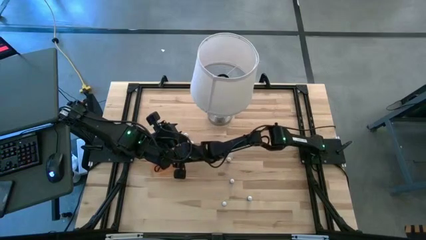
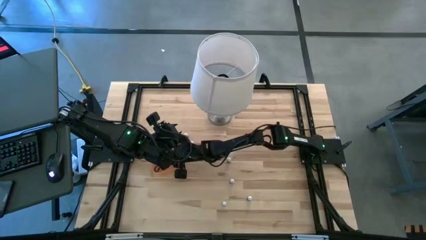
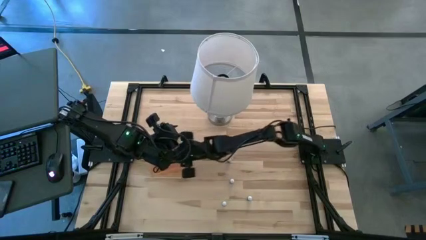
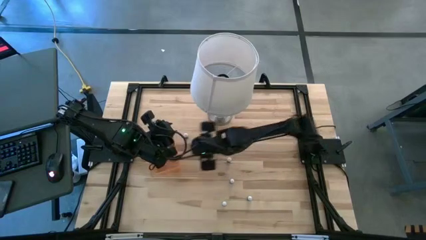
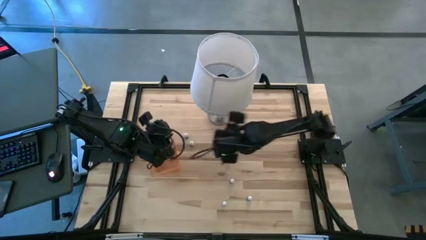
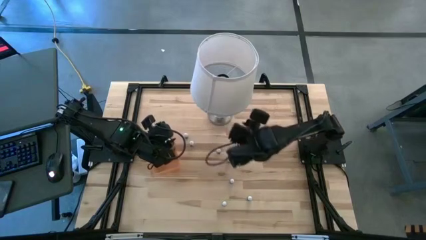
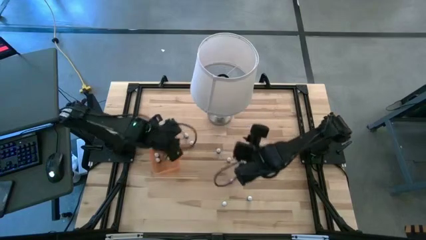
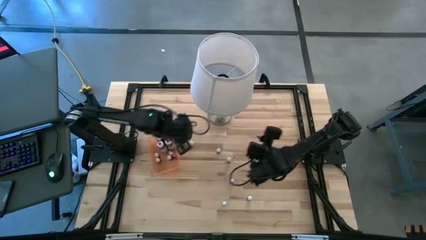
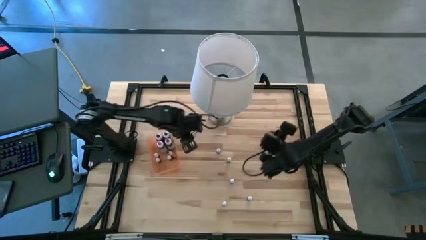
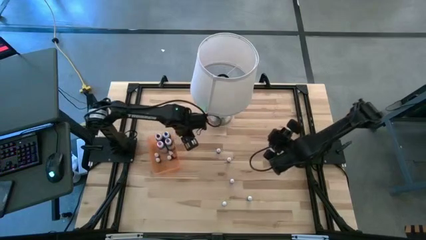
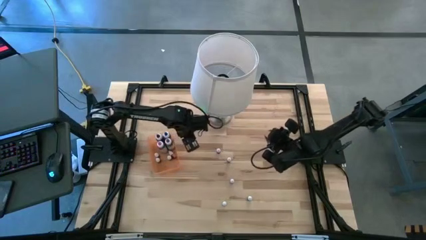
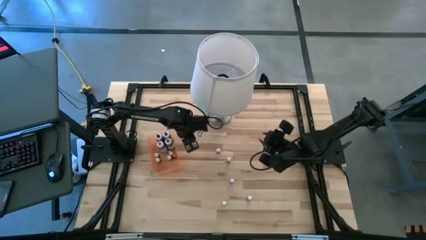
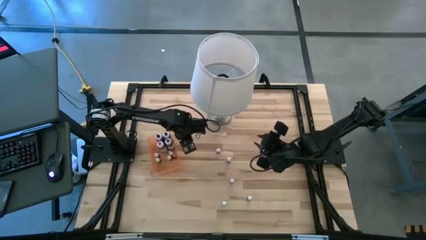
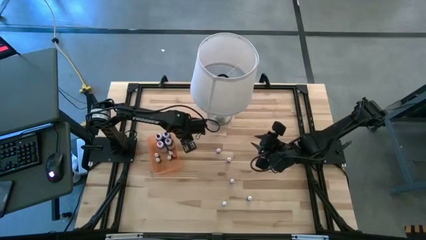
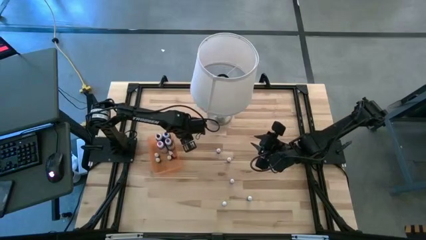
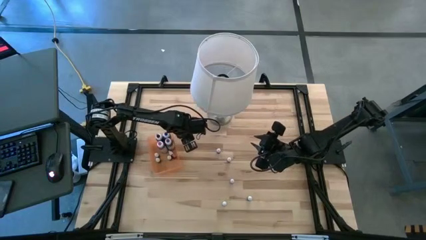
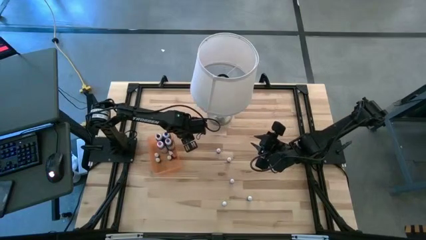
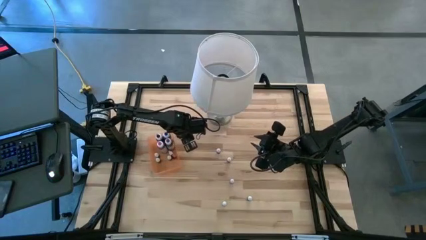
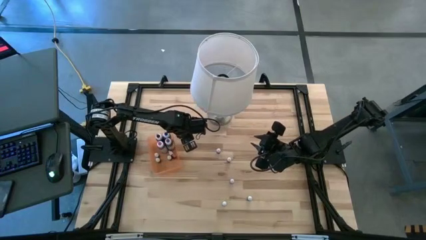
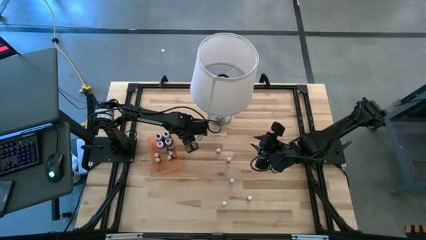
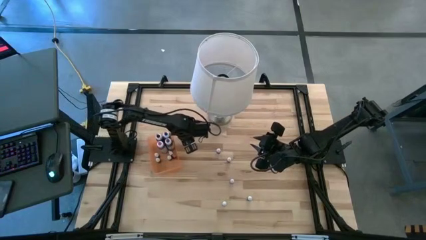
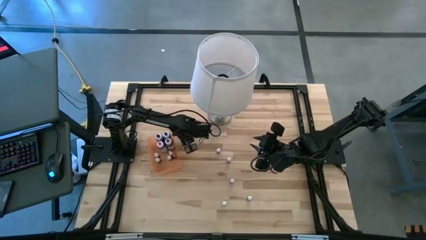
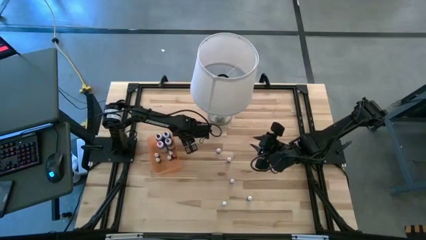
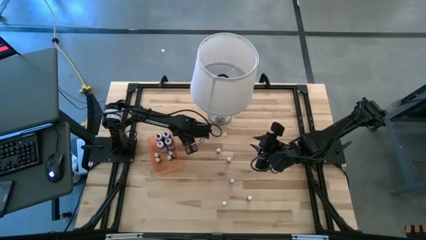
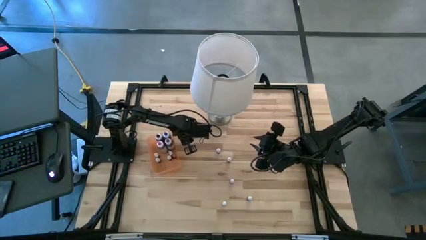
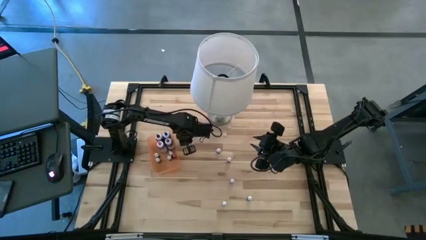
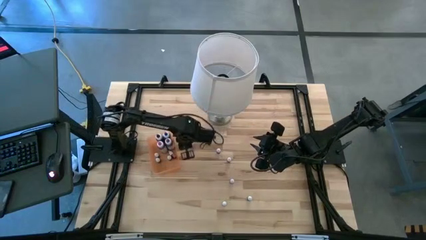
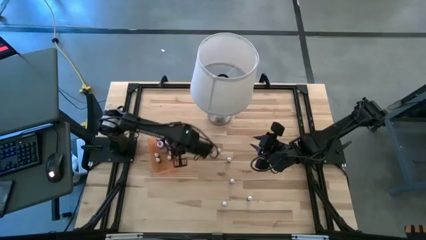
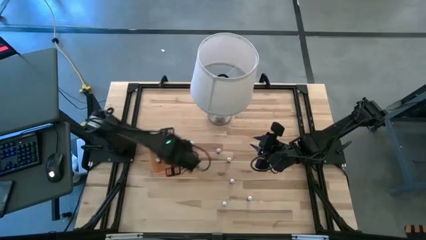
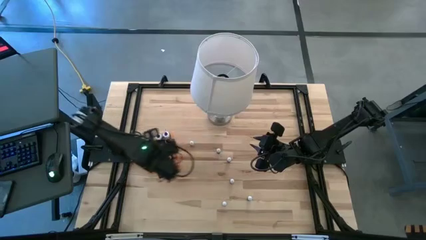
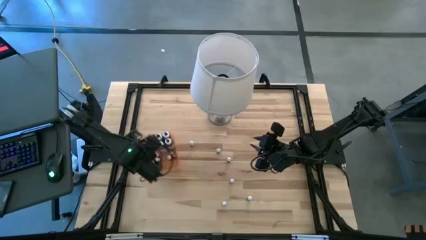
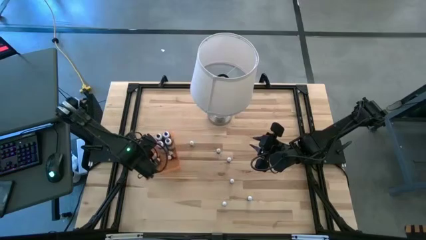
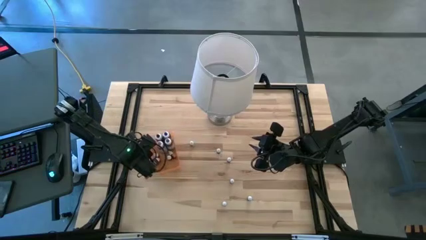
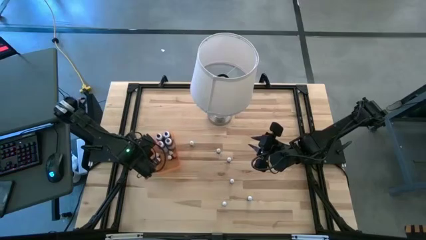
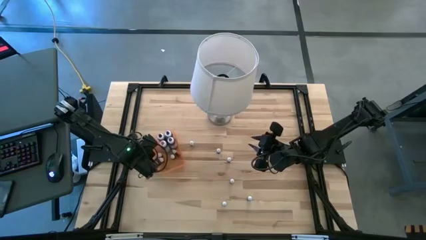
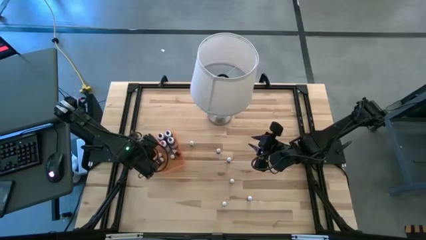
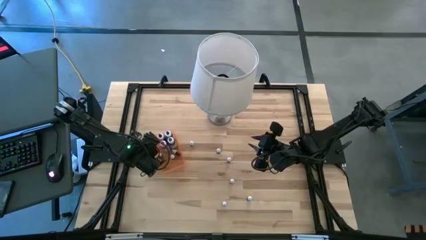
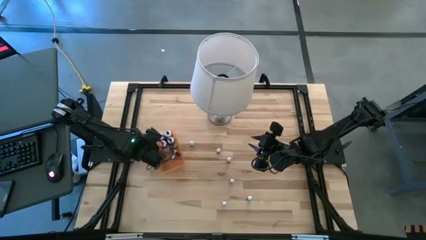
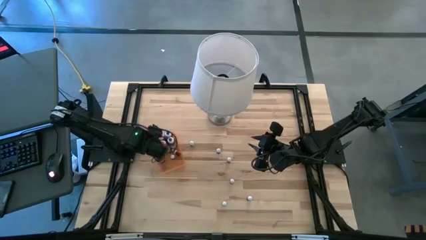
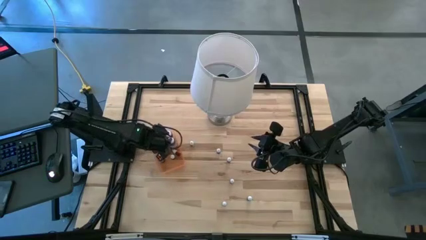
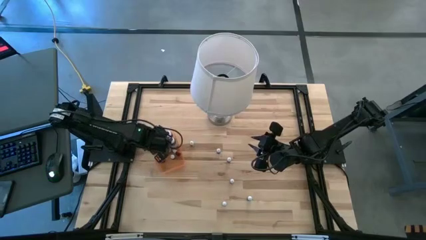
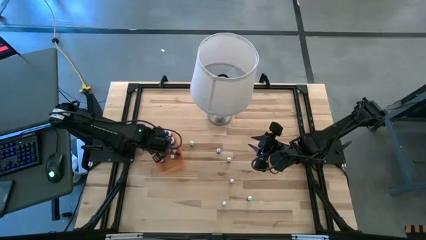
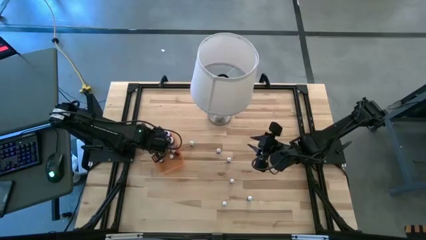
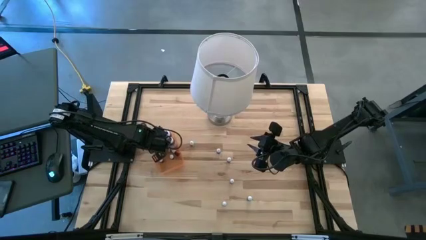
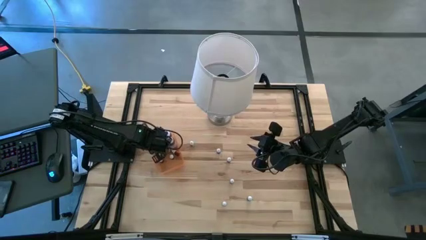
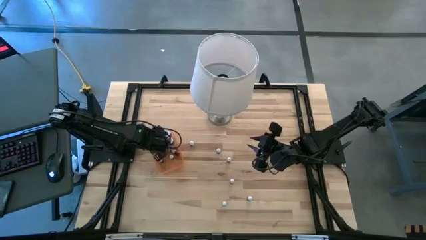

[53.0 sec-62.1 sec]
Task: Pick & Place food coloring
Put the dark blue food coloring bottle into the orange bin

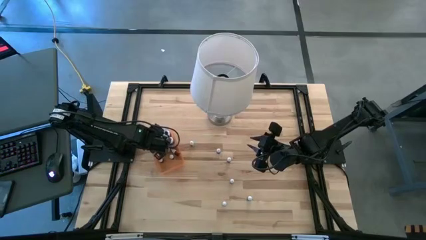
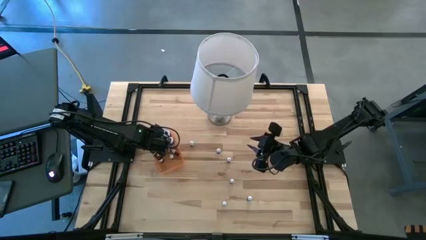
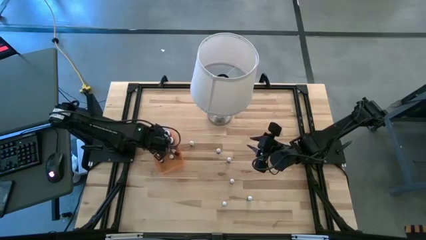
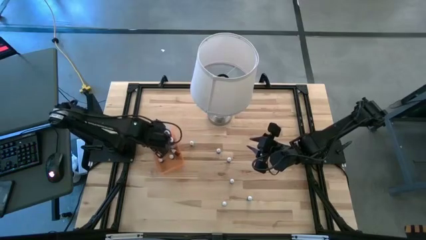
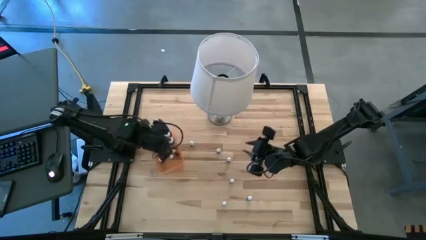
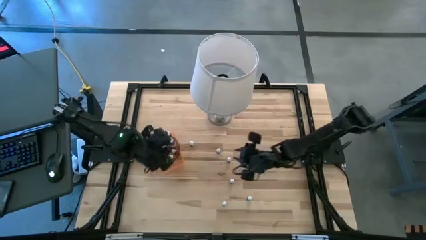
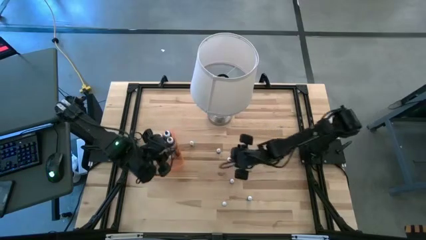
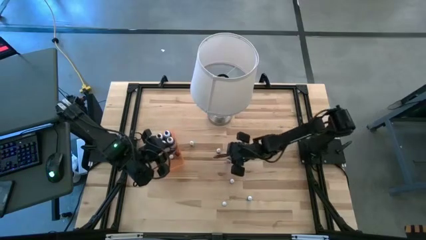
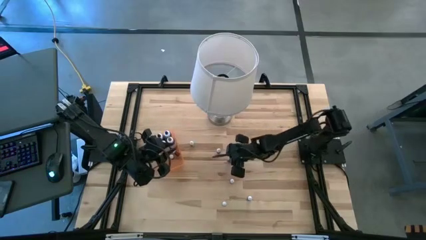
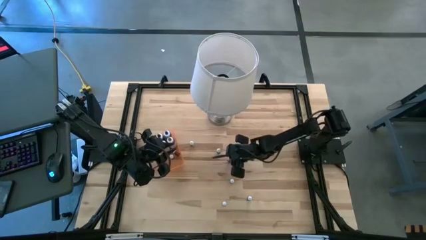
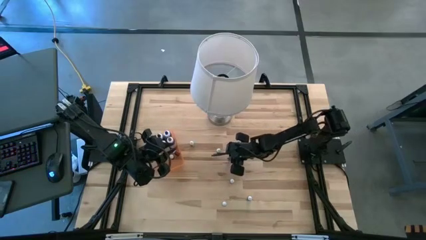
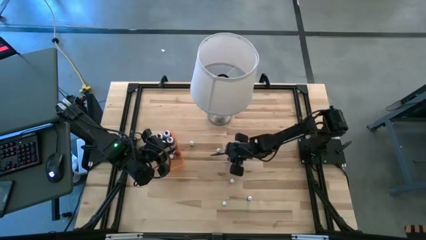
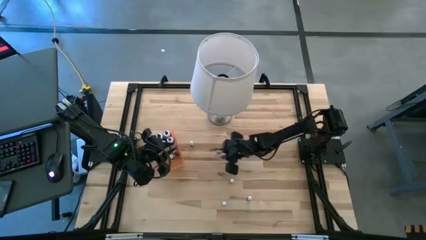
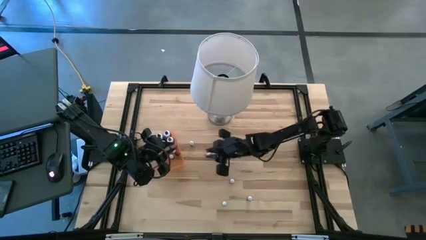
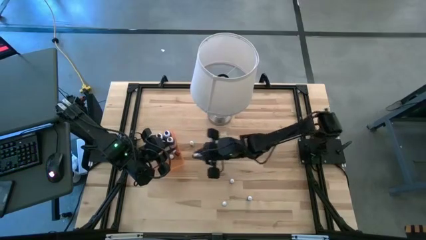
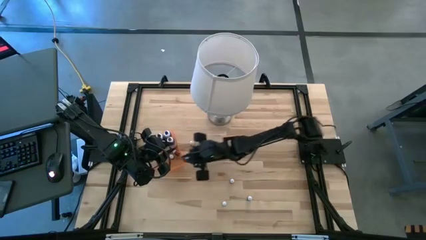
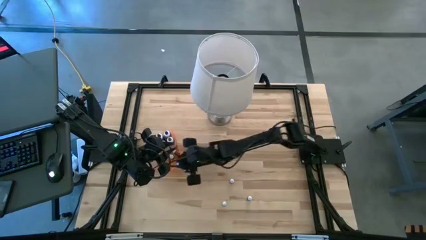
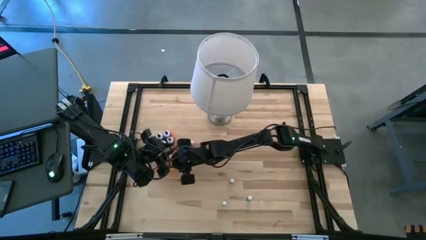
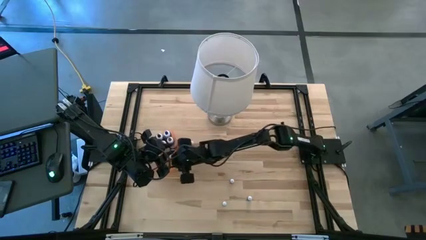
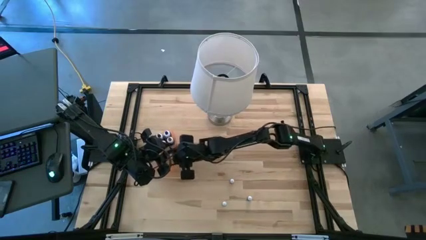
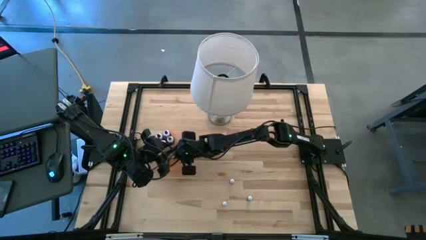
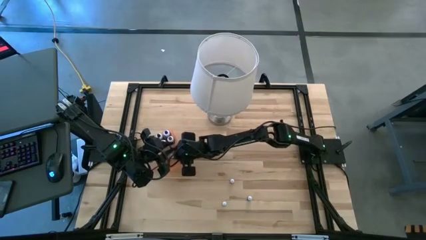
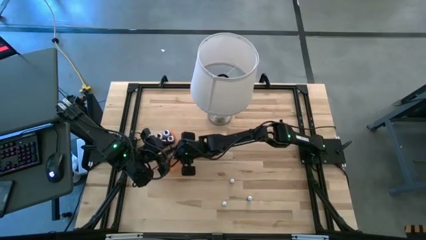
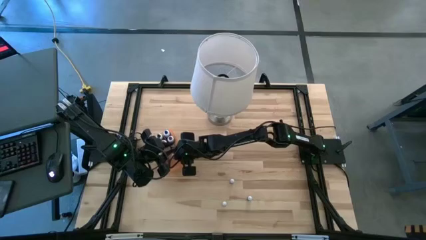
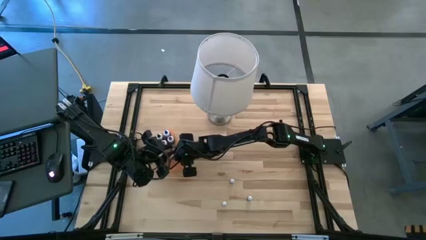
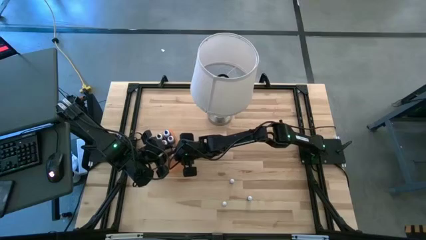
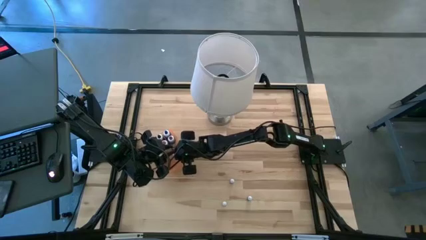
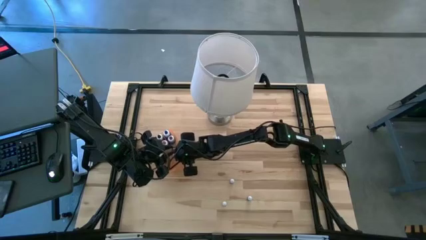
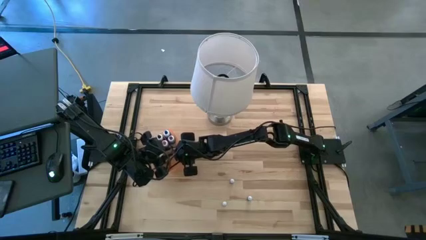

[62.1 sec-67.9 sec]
Put the red food coloring bottle into the orange bin
